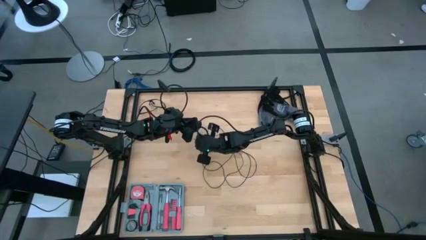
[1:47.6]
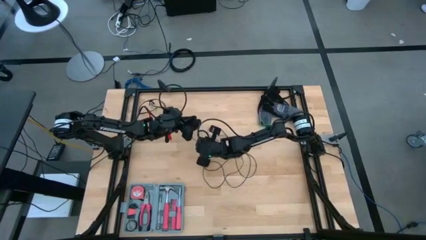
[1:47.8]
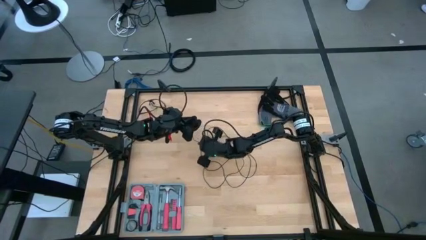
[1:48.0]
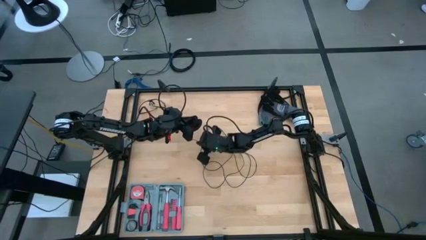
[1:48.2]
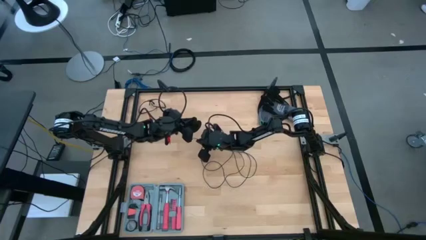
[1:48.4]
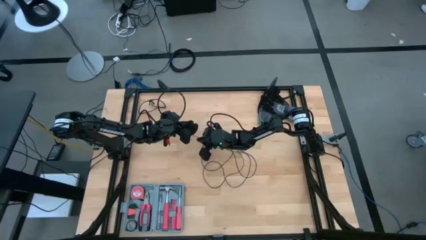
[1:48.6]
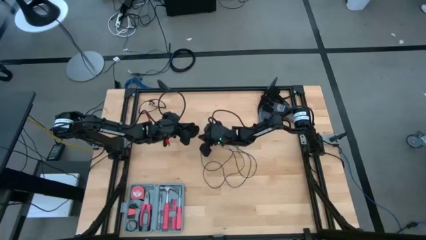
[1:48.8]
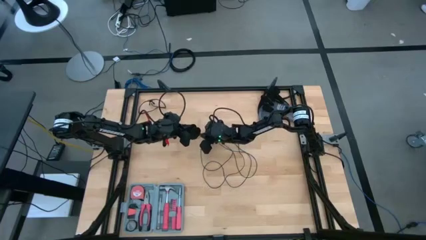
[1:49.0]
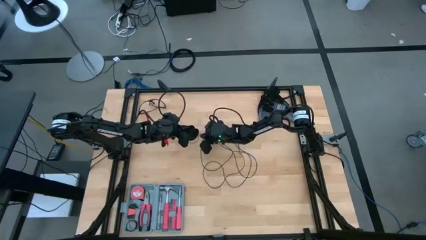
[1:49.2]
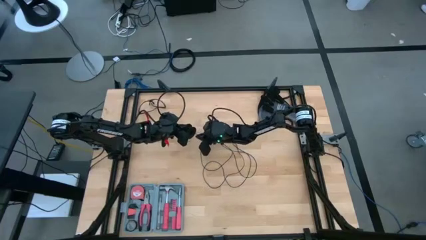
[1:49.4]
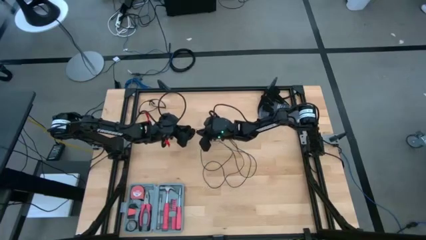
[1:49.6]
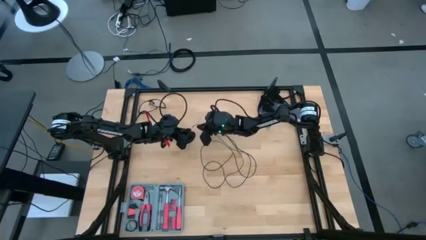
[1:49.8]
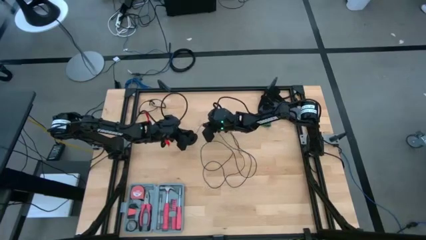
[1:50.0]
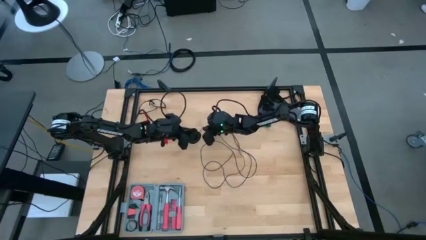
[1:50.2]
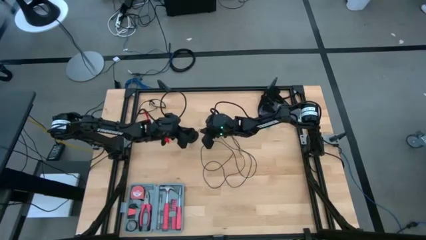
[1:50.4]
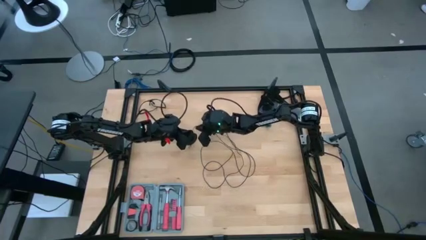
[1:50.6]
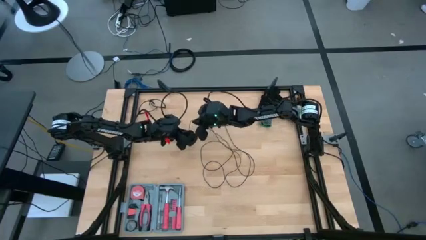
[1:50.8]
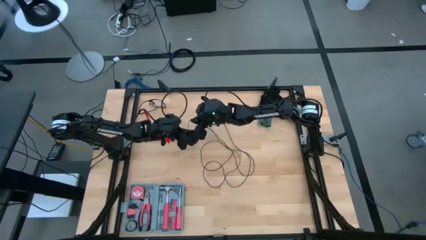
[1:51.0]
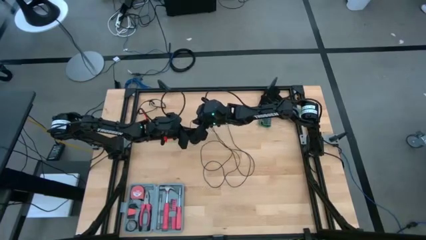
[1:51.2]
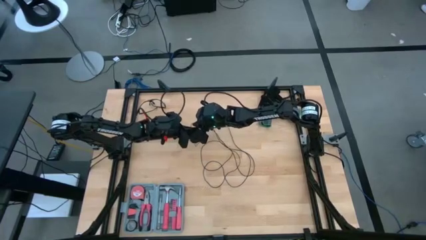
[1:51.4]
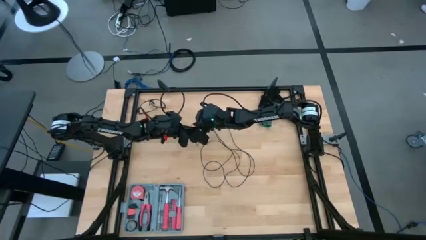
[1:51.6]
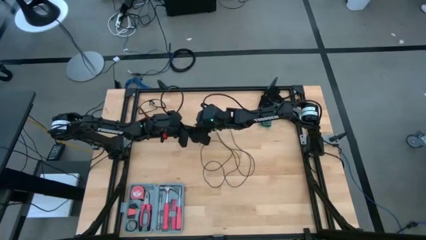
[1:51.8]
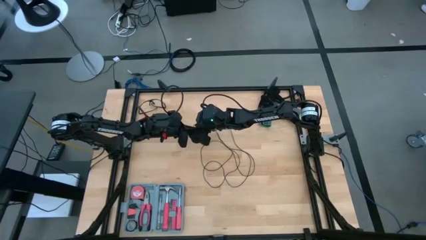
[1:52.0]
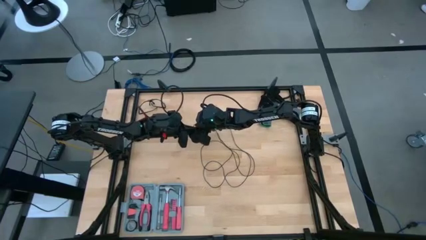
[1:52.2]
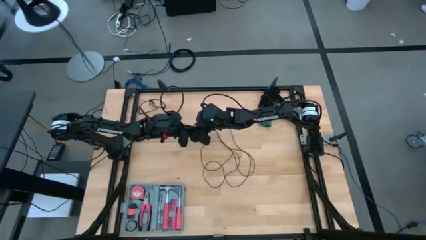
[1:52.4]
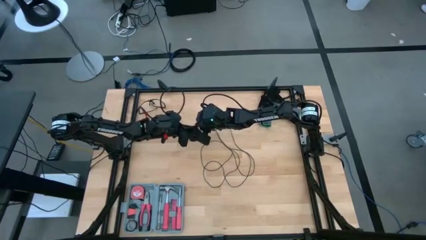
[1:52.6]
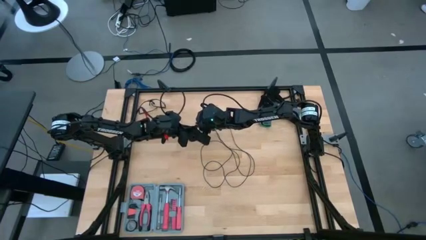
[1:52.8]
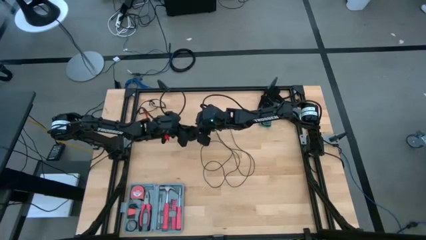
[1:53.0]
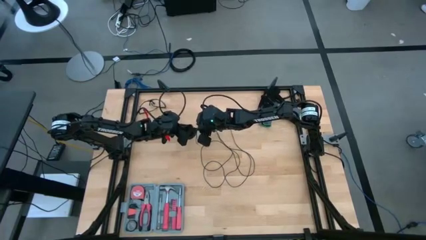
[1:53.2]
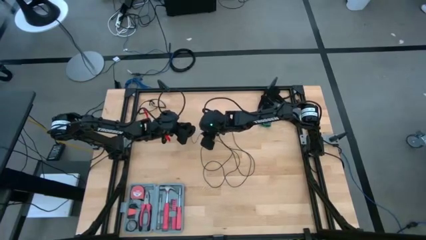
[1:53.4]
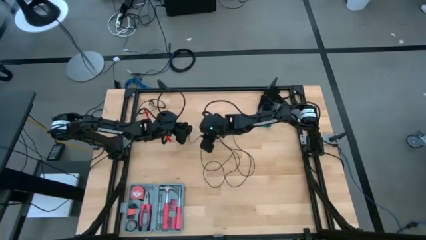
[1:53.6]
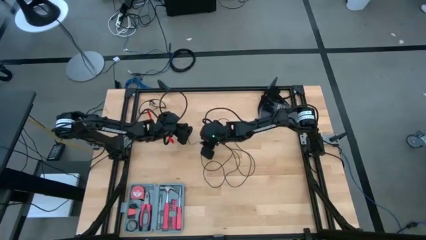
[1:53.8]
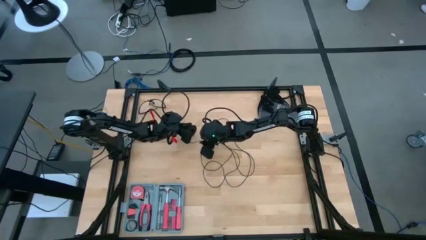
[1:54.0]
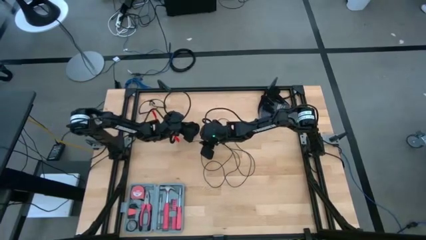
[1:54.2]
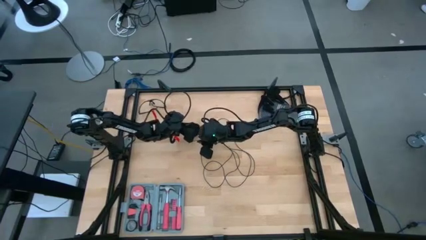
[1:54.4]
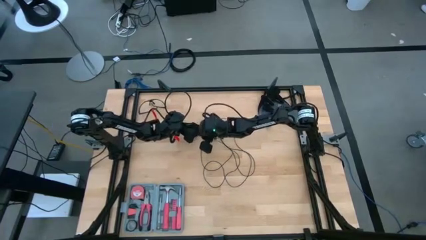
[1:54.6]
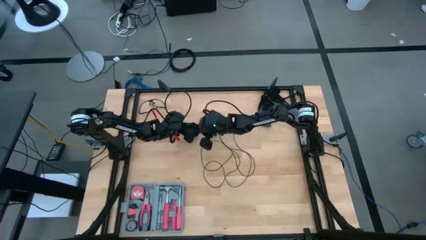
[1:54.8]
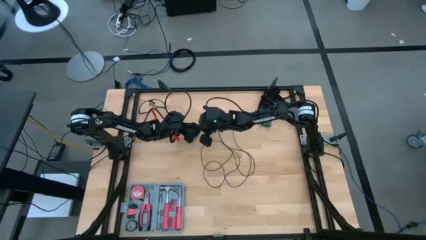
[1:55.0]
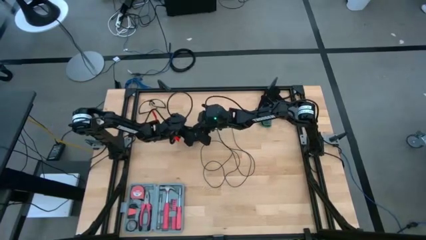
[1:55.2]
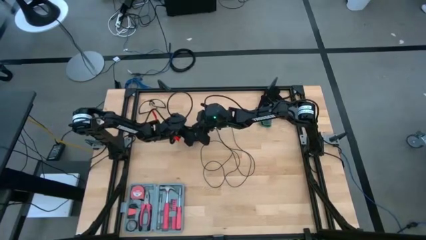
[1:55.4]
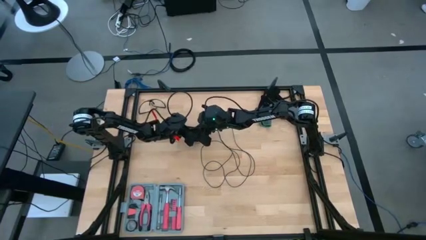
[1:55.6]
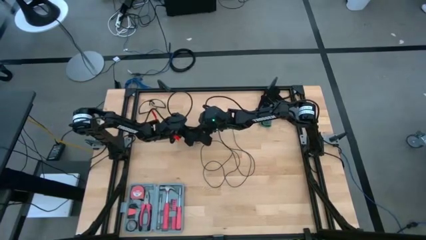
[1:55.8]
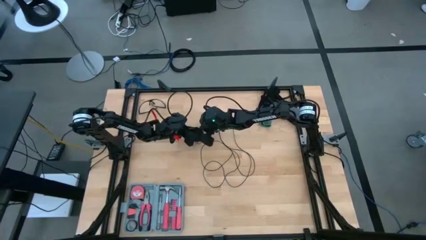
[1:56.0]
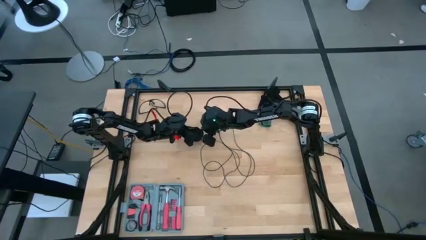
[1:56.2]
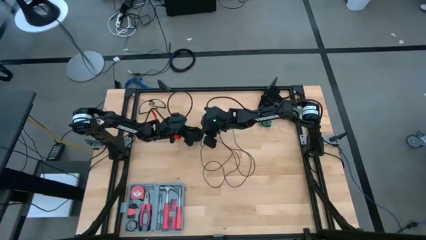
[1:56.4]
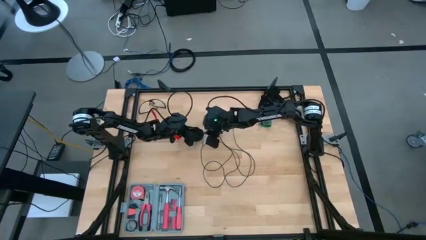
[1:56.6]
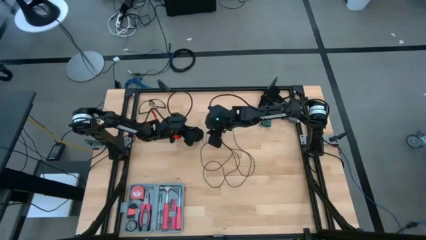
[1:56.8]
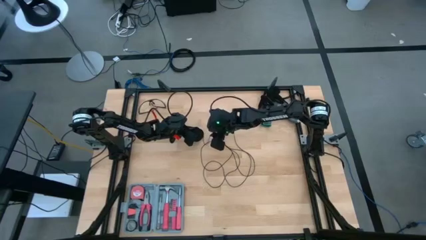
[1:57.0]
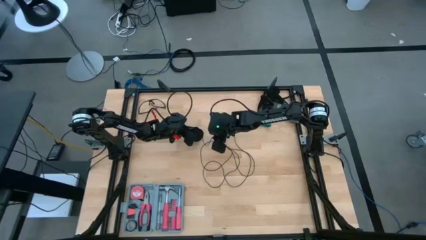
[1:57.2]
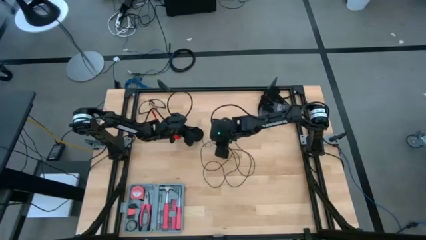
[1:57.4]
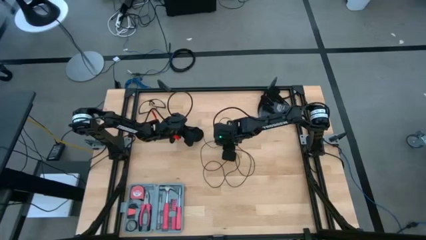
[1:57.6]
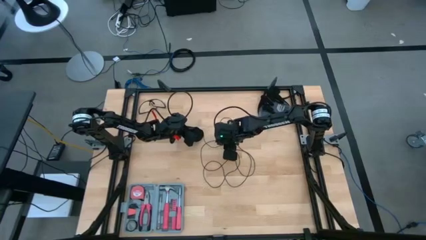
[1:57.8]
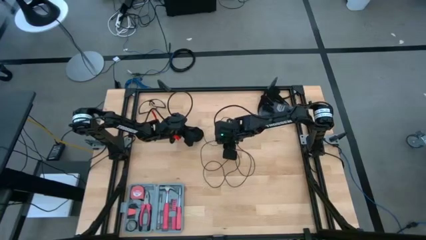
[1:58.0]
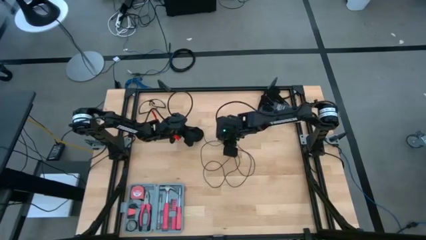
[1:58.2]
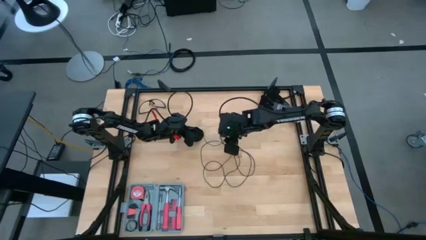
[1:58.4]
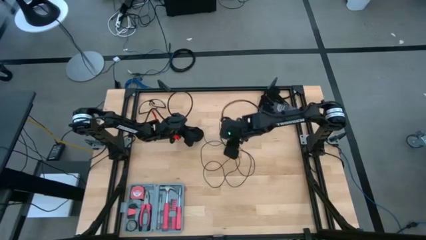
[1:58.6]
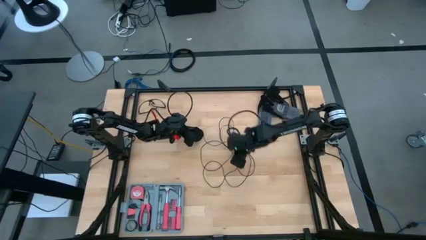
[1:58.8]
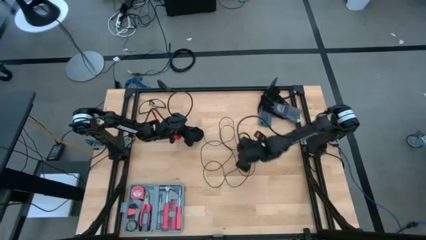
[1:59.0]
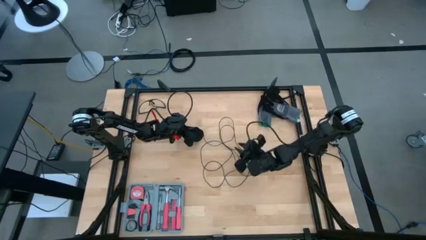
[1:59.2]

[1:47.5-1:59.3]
Task: Coil cords
Coil the black wire onto the black spool
